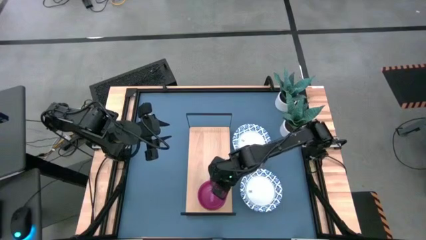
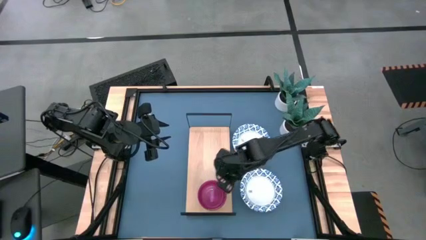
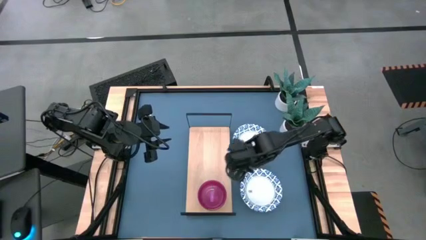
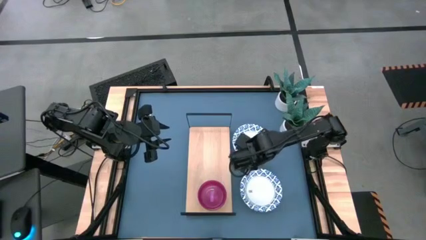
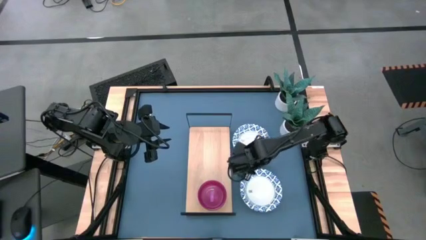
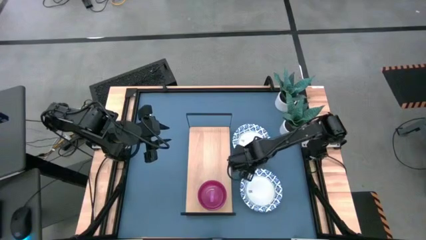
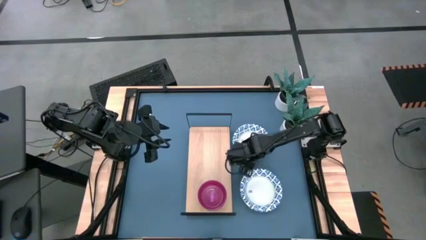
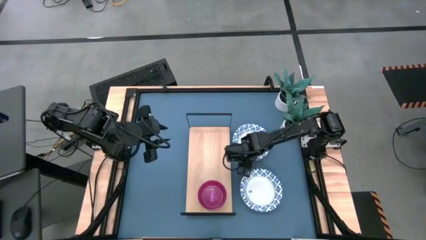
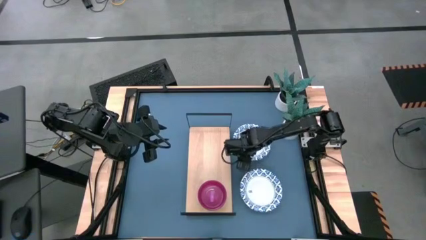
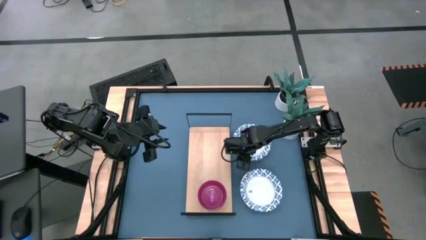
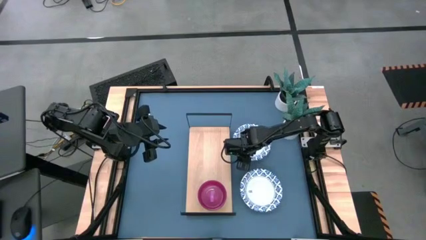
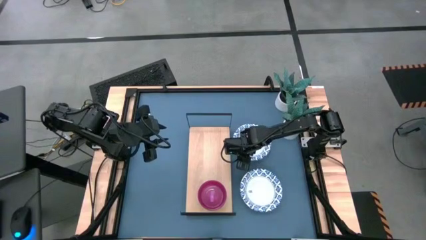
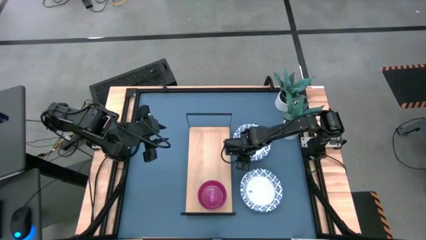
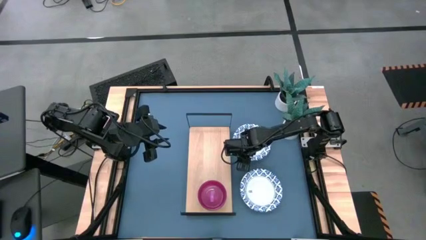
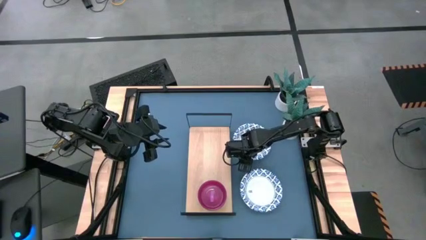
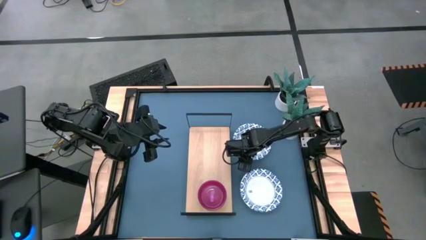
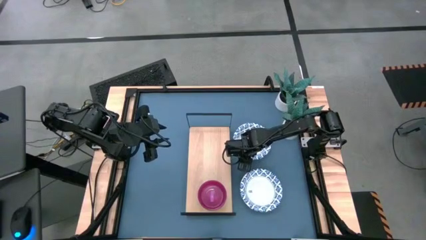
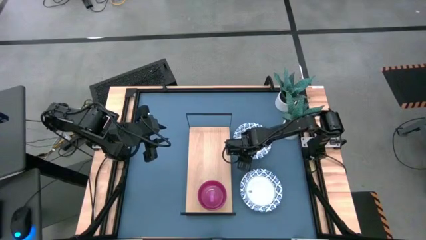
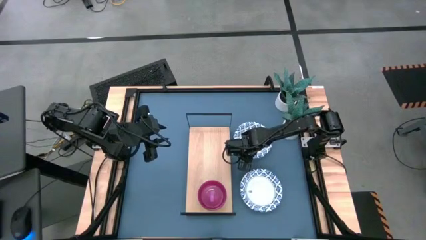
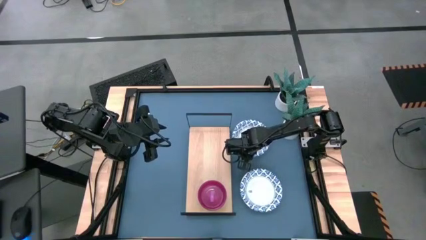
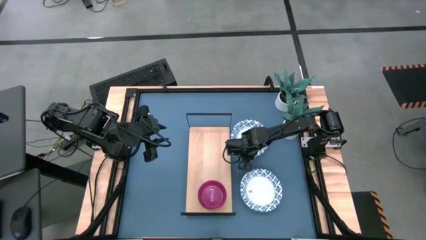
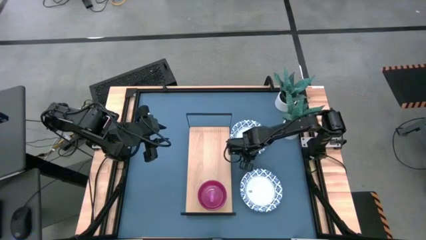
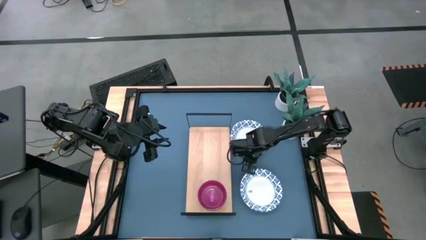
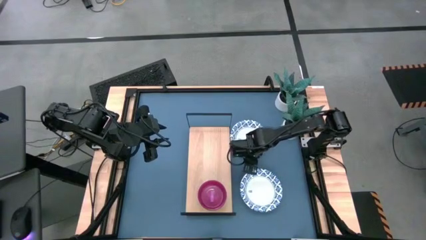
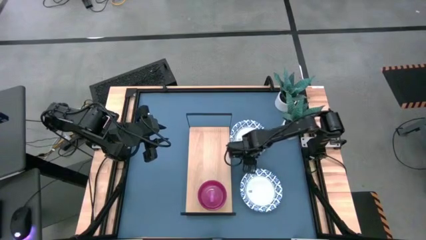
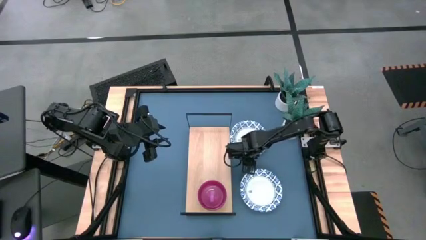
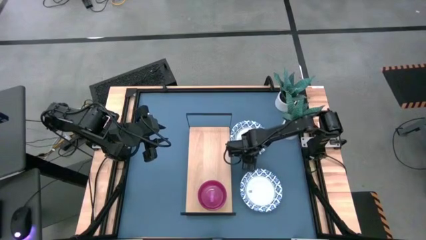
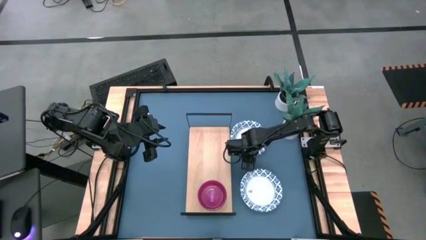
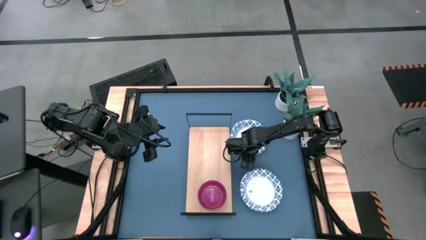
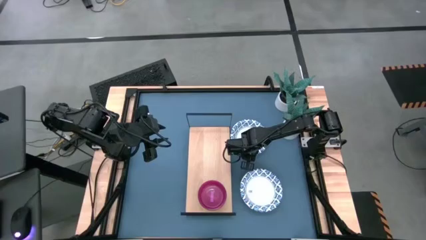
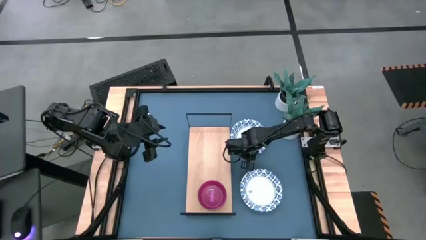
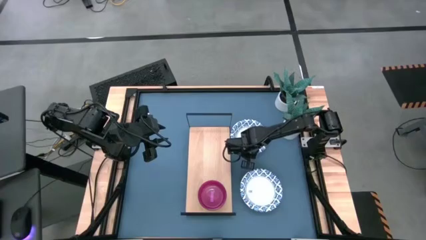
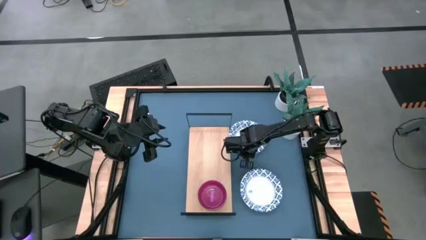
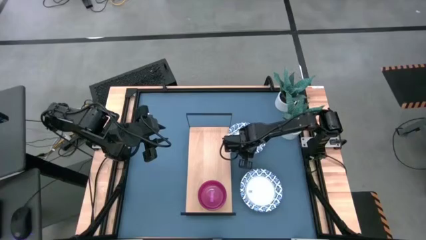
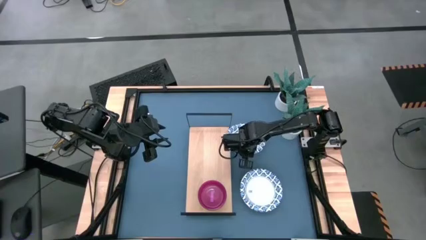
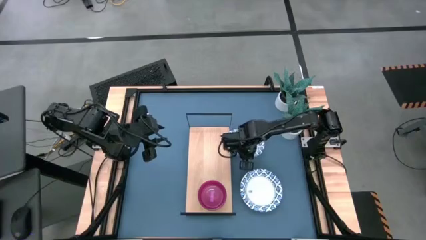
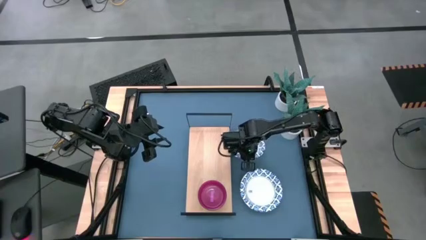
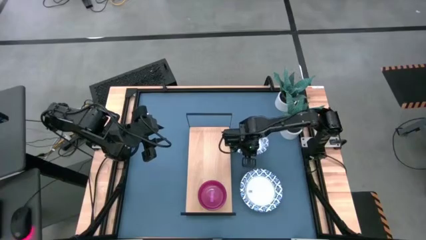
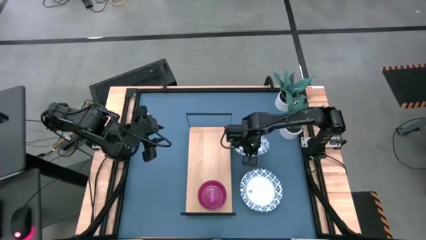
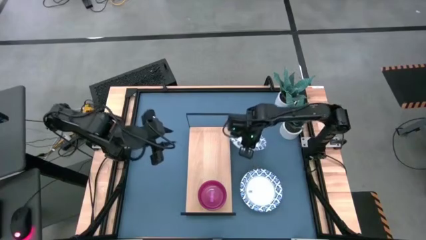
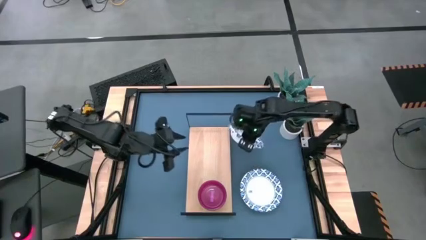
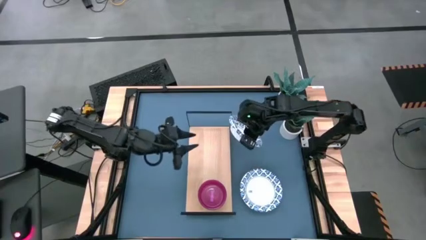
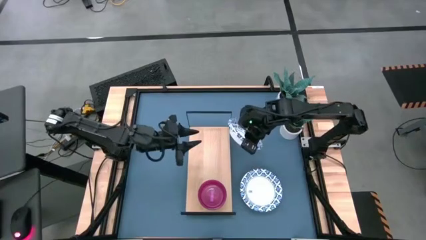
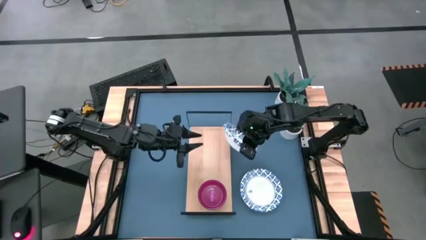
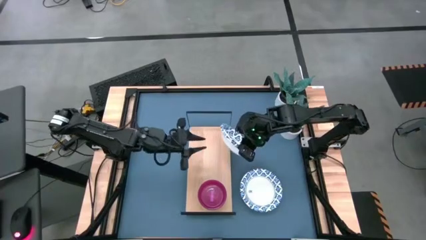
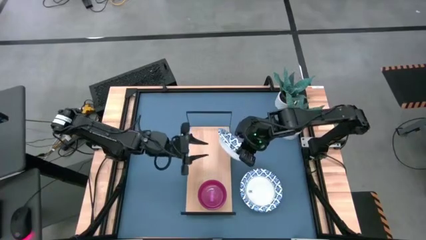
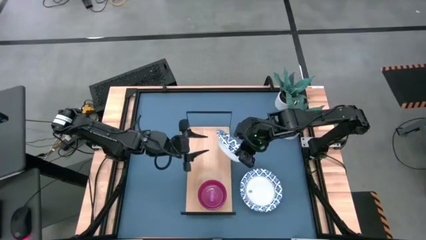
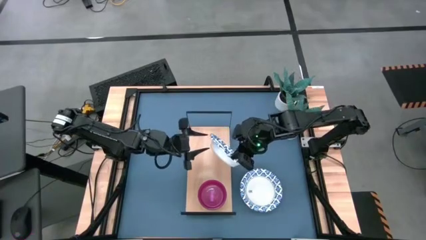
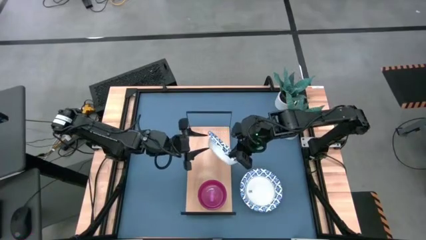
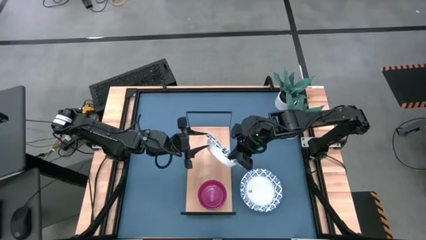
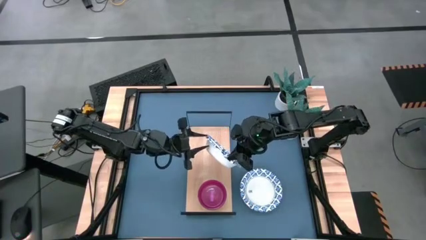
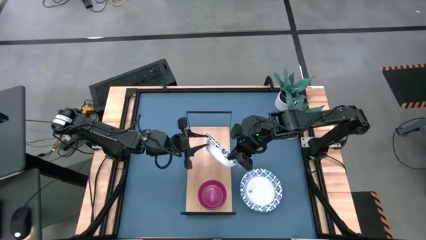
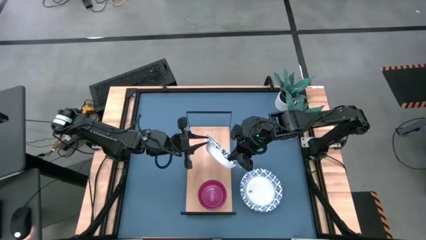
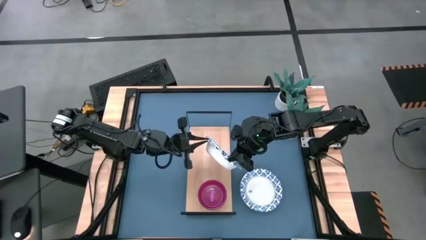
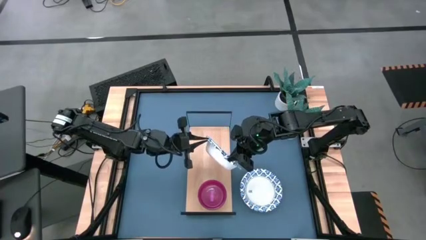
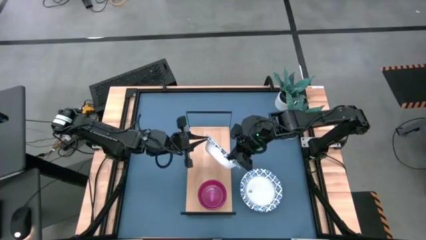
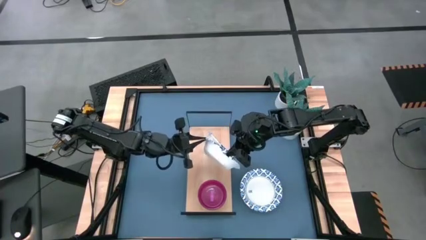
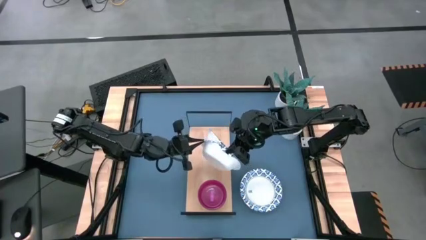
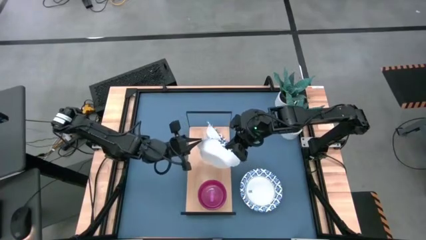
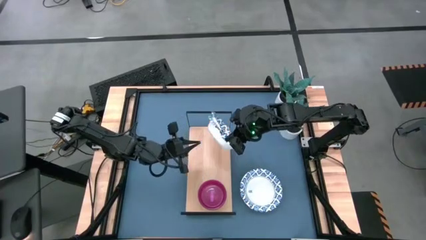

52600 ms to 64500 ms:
Task: Place and stack bowls onto a shelf
Remove the top white bowl from the stacked bowl

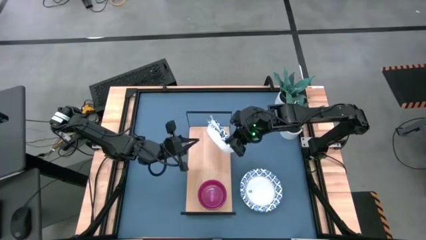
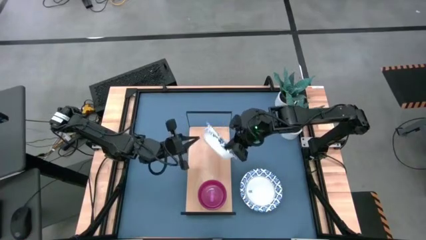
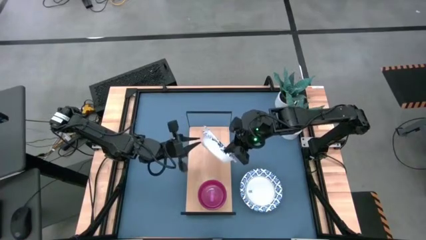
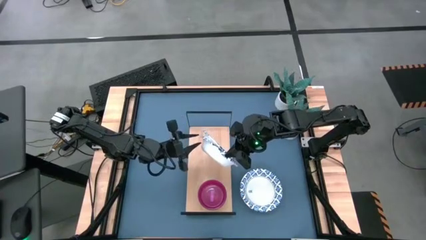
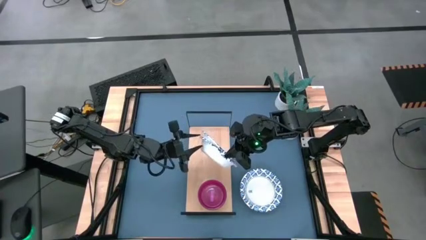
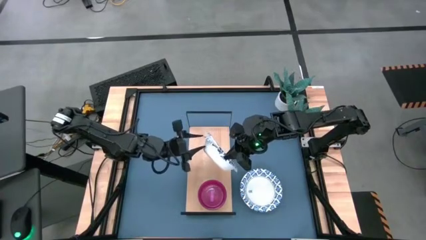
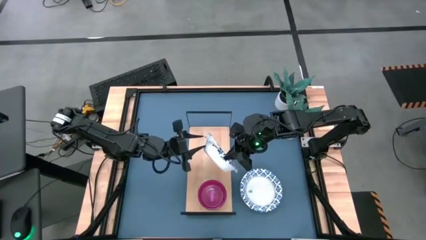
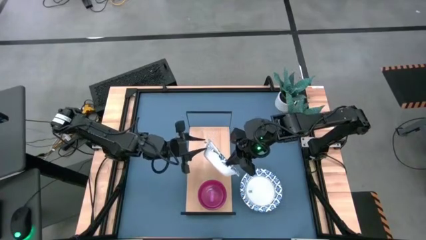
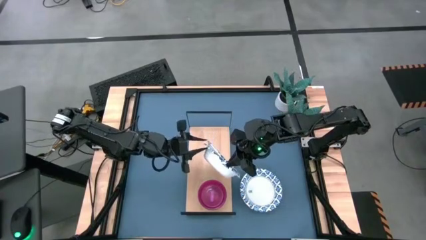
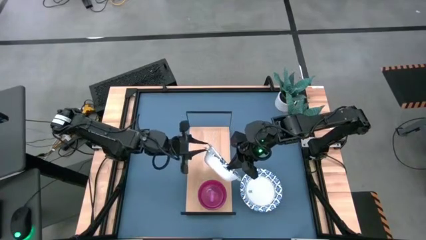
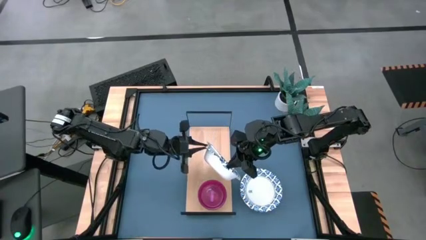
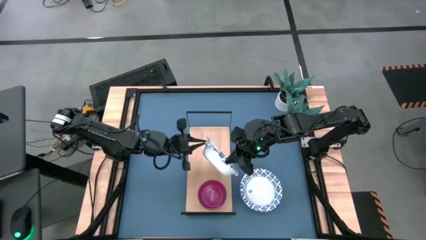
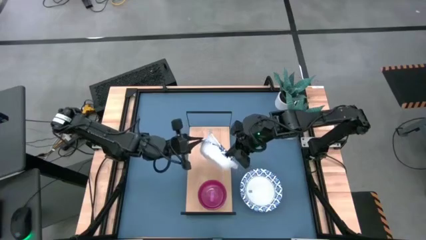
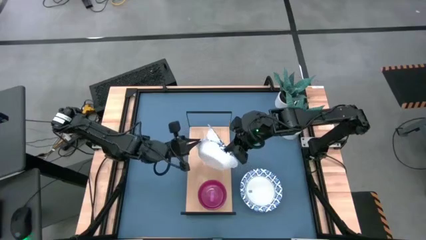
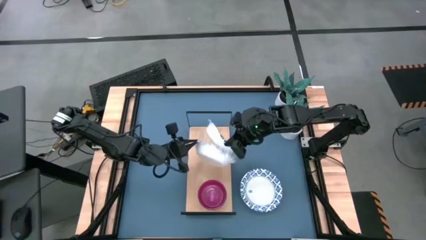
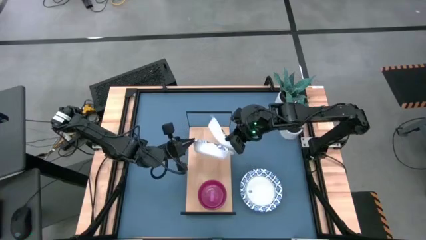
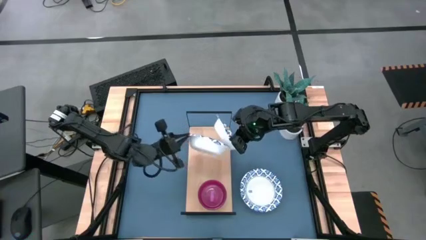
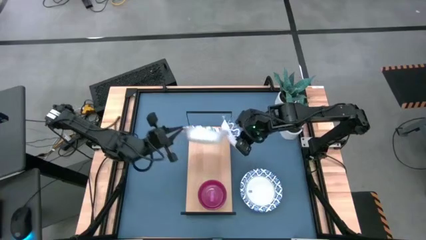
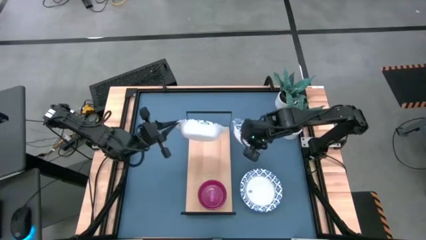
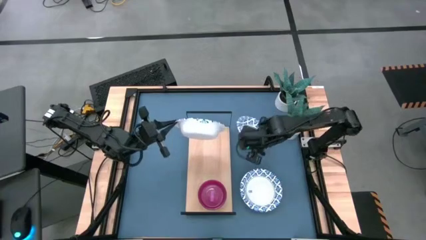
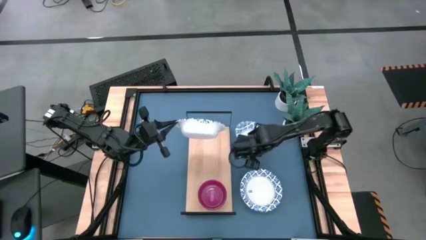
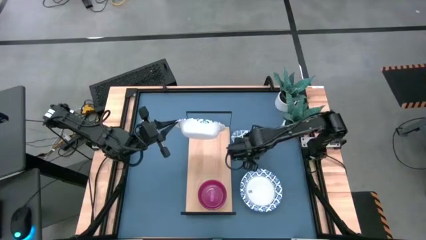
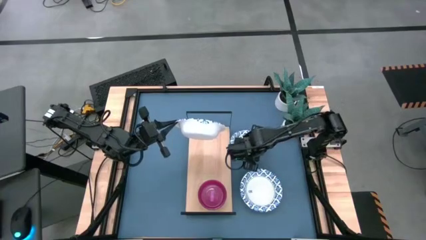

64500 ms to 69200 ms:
Remove the top white bowl from the stacked bowl
